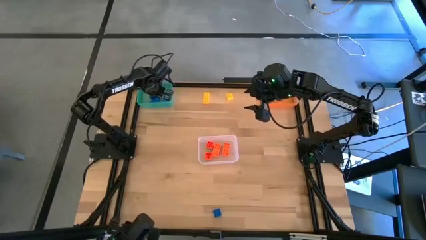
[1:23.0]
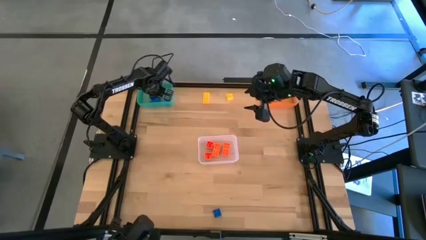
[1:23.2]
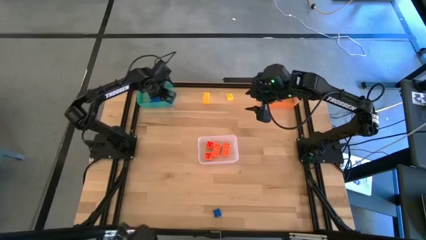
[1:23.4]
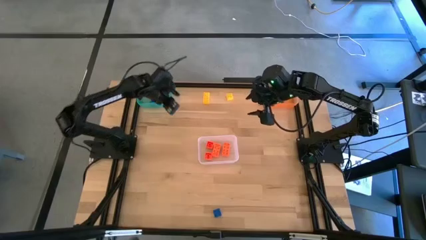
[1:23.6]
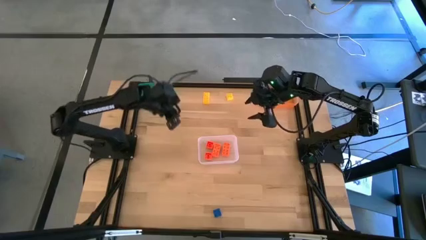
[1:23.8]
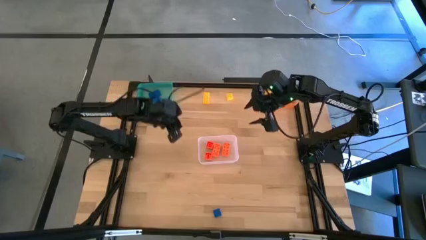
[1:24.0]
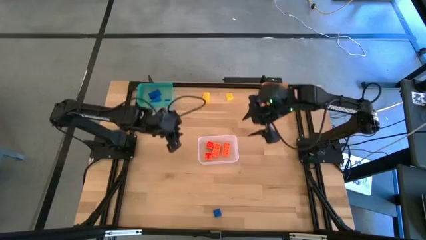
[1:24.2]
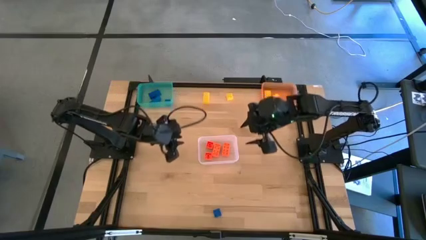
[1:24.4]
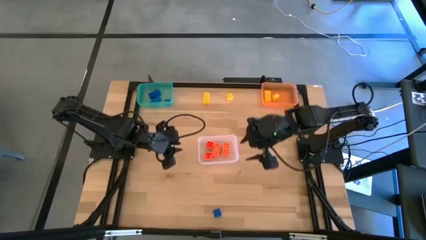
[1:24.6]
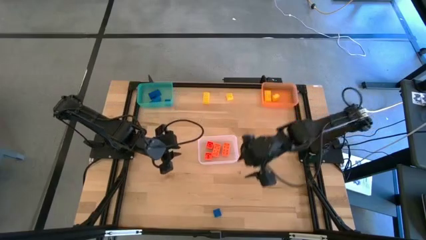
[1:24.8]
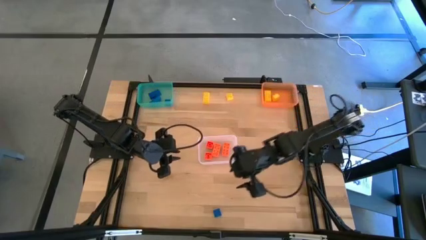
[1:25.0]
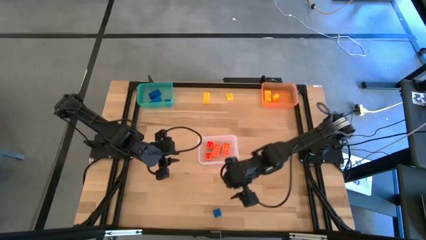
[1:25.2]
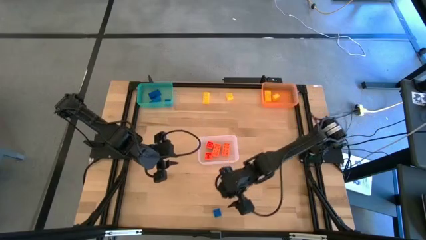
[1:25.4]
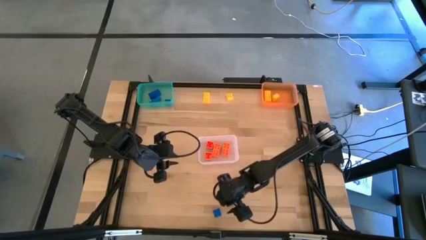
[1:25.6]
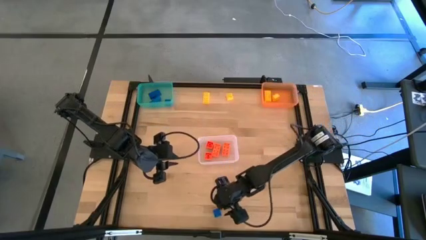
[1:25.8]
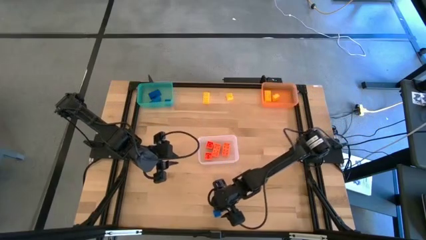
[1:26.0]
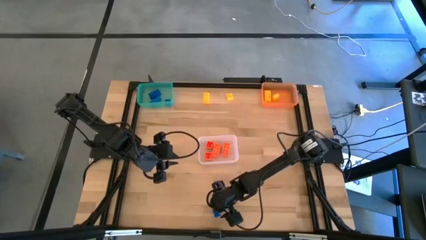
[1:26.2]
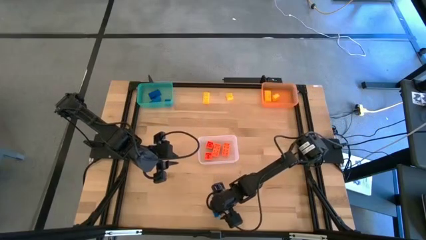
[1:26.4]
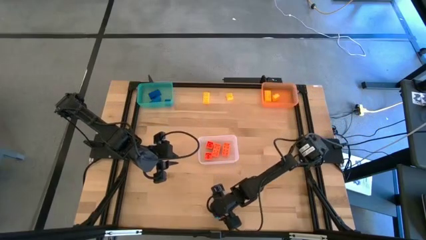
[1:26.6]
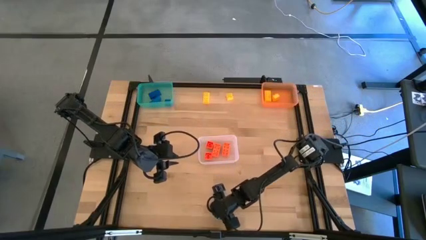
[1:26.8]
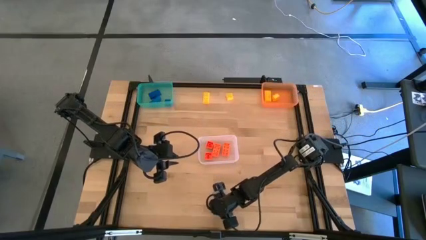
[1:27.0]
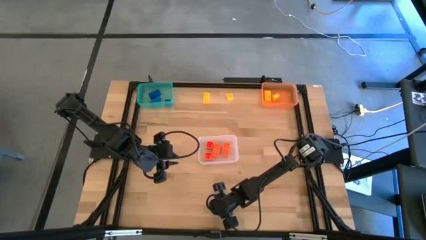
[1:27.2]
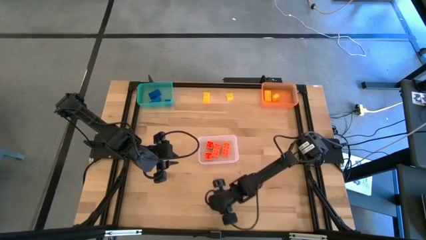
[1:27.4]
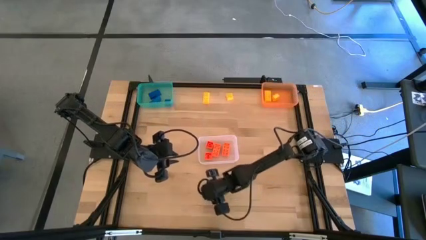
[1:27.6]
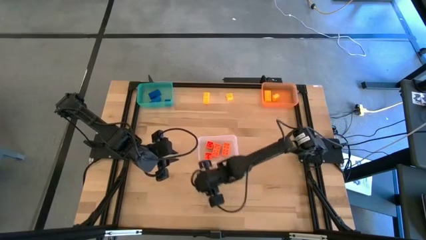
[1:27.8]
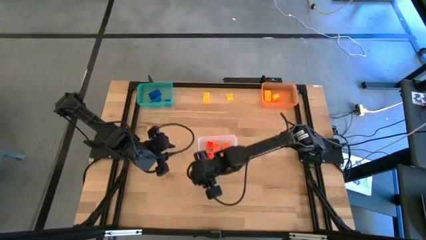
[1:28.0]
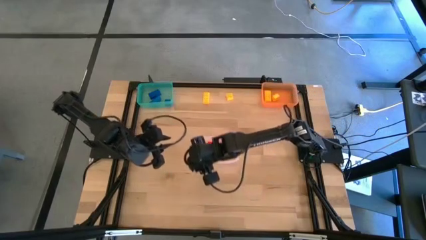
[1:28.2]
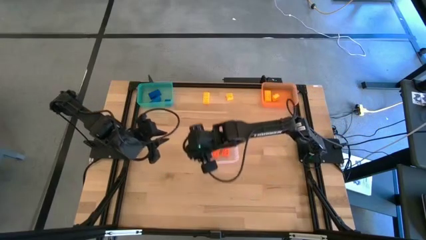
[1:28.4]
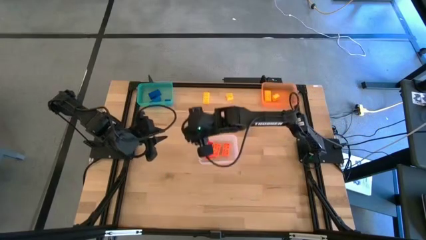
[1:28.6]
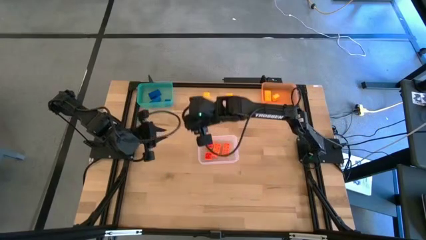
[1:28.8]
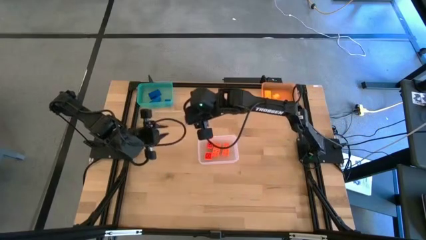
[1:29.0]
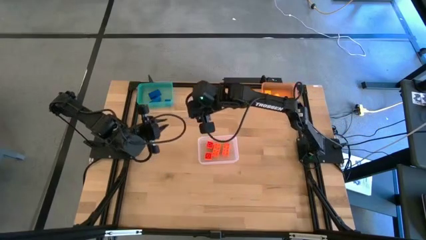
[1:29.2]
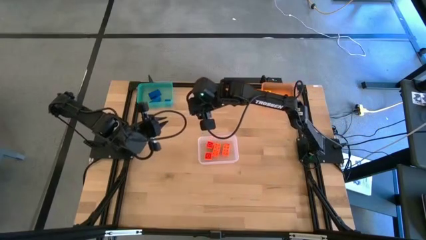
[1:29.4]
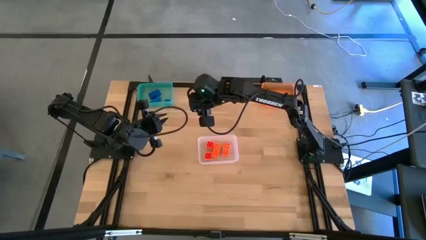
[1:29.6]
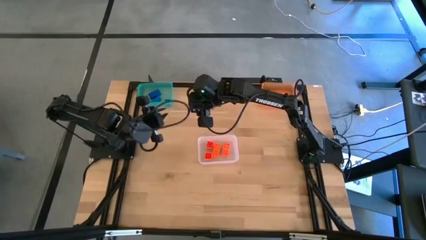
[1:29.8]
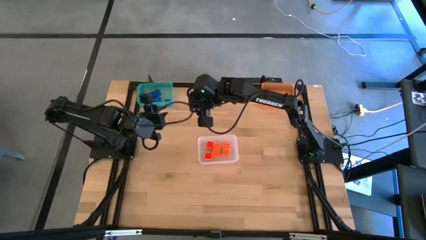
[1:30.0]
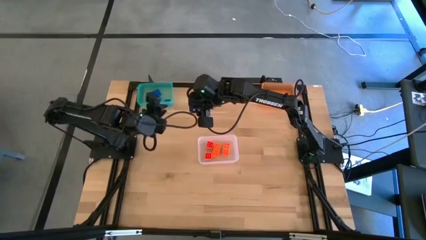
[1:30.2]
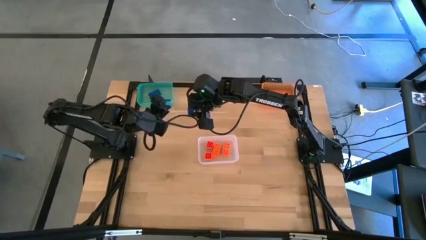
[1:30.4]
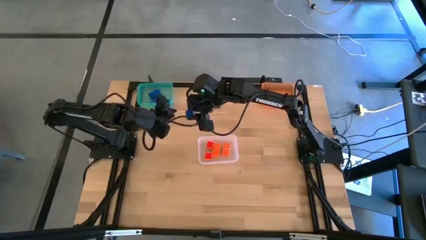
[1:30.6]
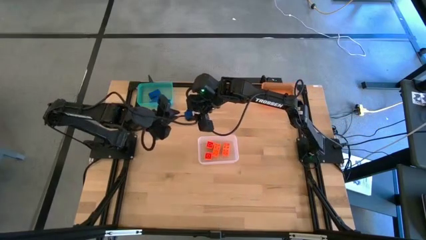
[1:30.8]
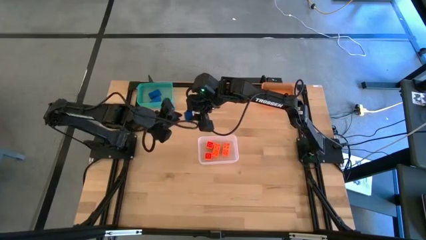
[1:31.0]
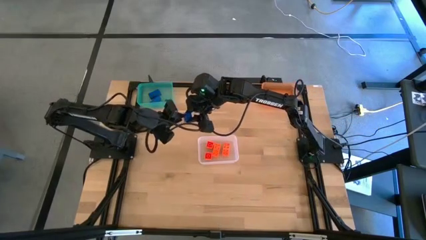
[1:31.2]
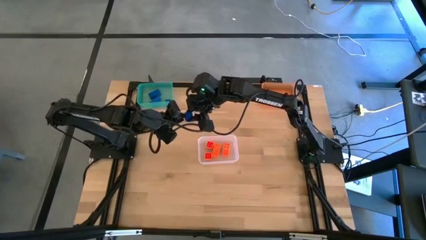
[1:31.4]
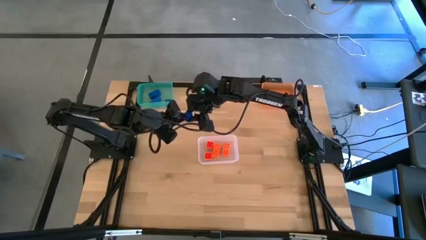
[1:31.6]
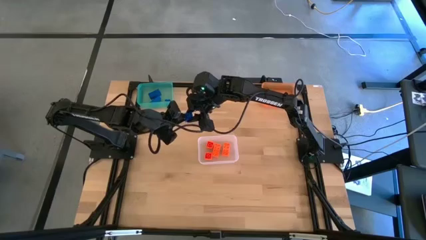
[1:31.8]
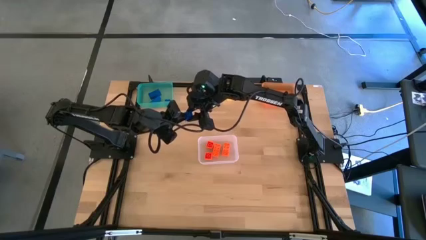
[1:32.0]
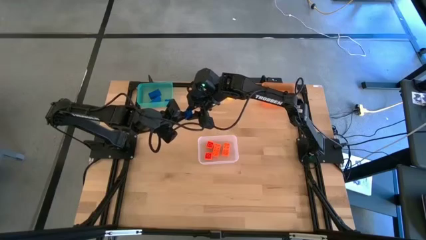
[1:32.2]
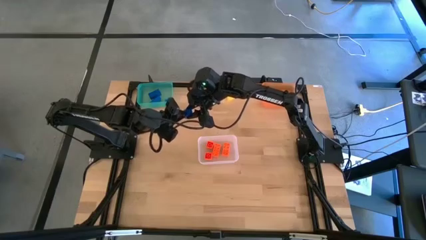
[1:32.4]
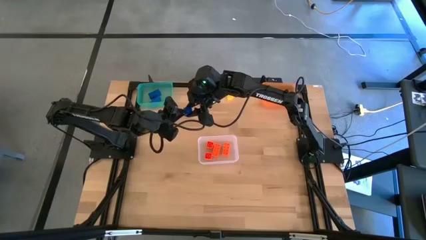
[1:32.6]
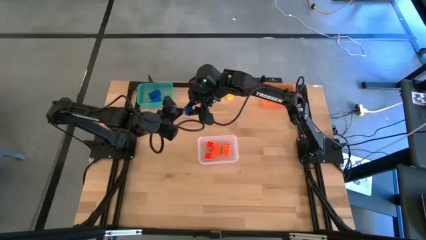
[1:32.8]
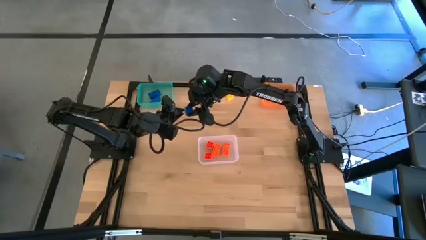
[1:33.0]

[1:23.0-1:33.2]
Task: Sort & place blocks by color
Put the blue game piece into the blue bin

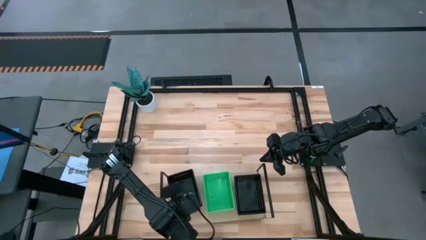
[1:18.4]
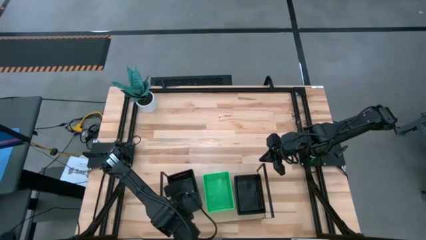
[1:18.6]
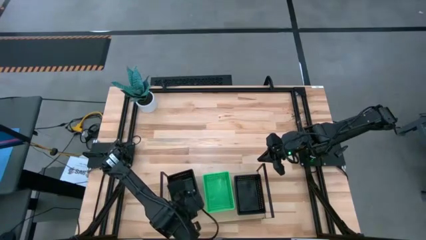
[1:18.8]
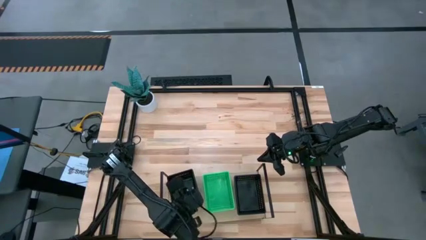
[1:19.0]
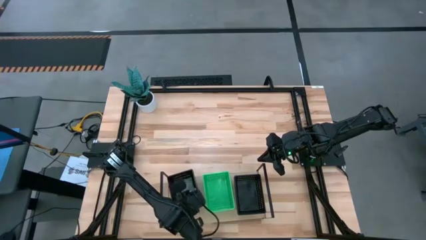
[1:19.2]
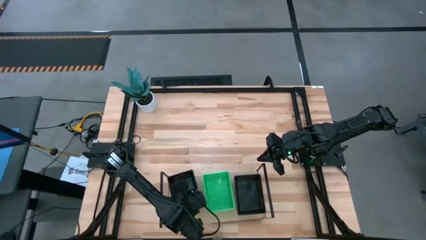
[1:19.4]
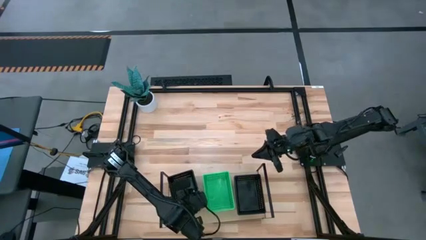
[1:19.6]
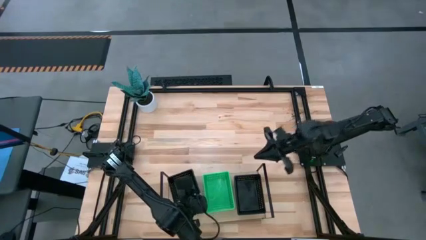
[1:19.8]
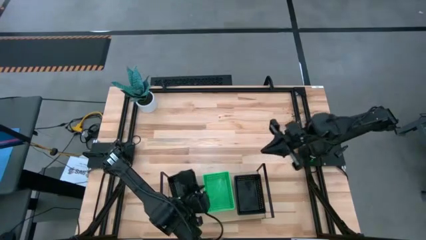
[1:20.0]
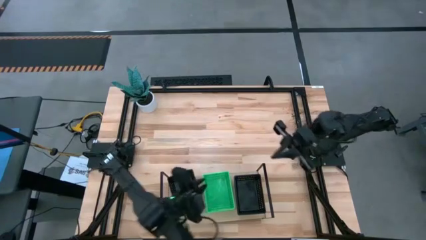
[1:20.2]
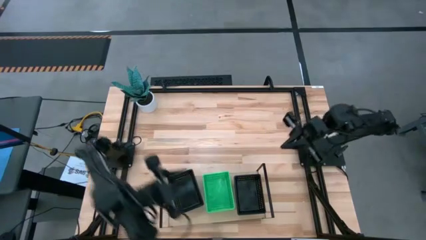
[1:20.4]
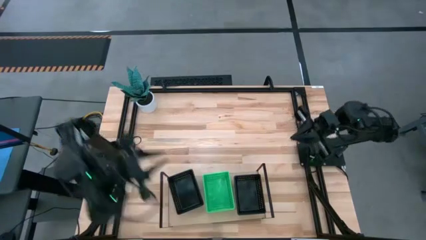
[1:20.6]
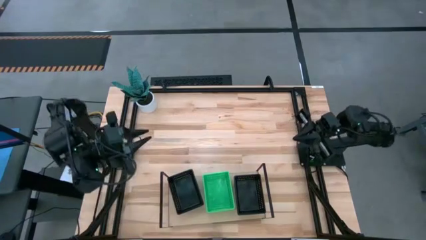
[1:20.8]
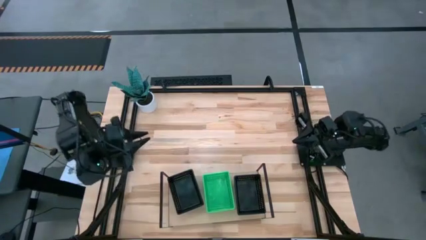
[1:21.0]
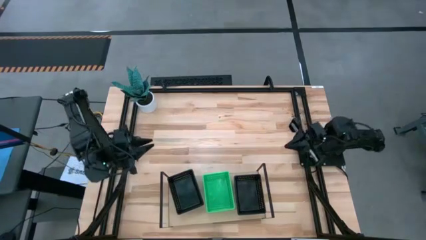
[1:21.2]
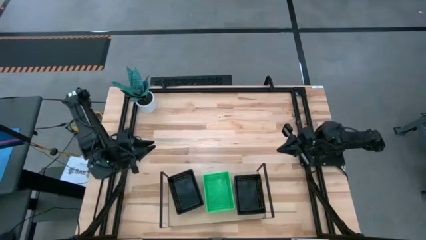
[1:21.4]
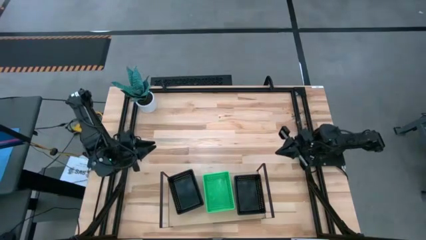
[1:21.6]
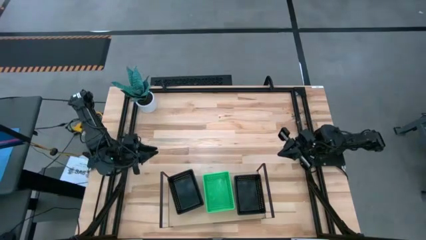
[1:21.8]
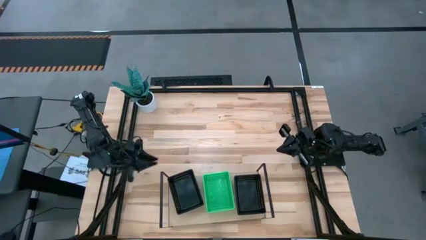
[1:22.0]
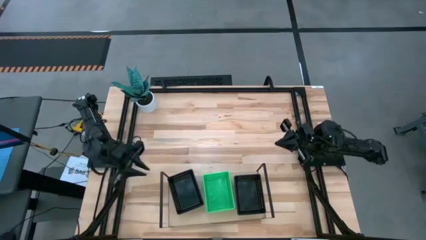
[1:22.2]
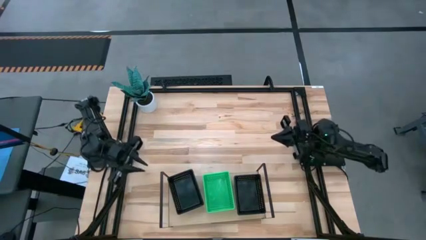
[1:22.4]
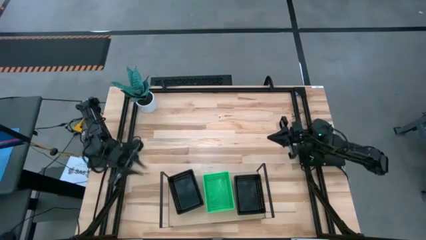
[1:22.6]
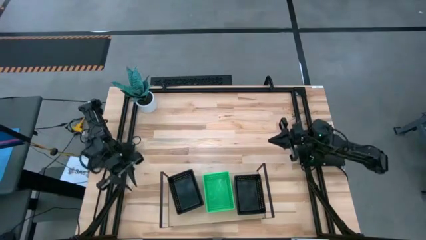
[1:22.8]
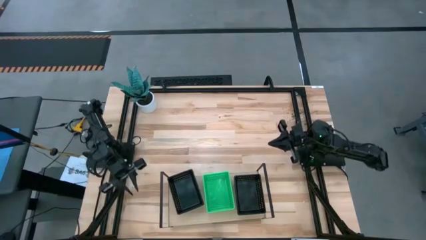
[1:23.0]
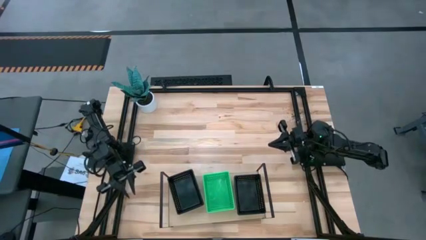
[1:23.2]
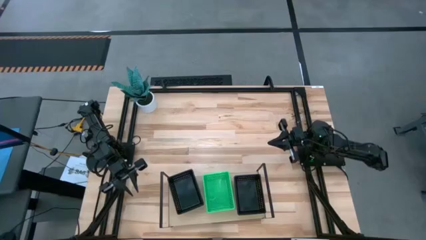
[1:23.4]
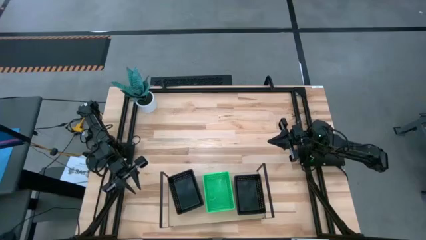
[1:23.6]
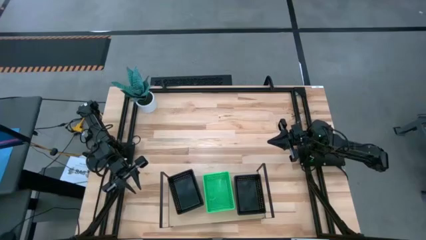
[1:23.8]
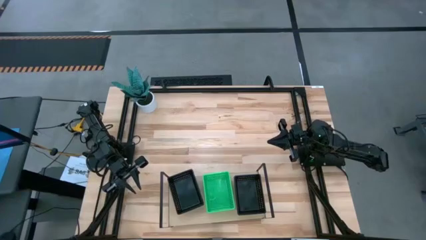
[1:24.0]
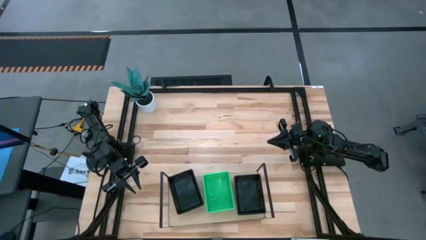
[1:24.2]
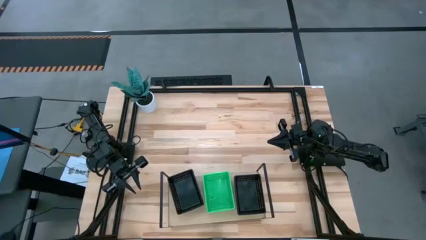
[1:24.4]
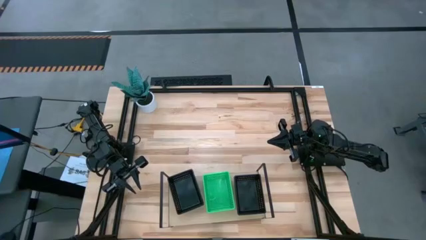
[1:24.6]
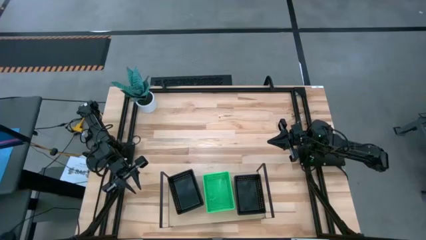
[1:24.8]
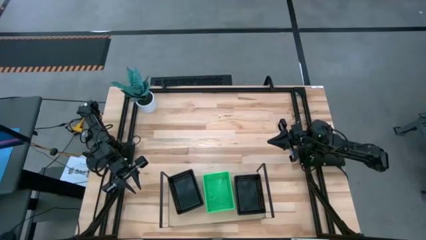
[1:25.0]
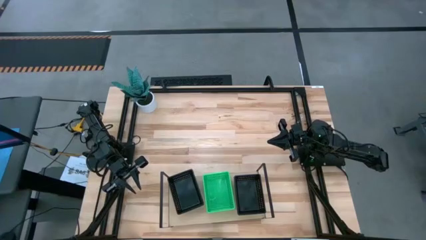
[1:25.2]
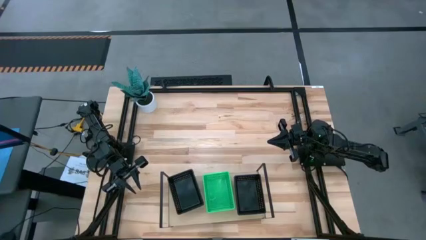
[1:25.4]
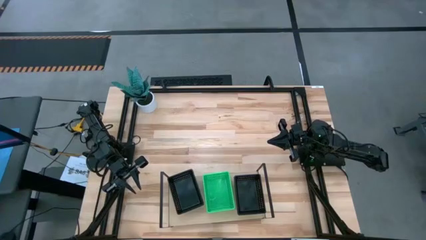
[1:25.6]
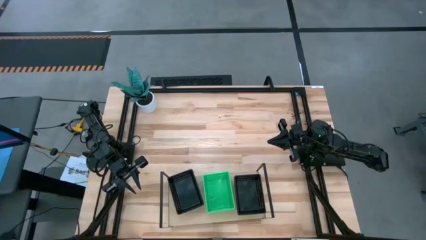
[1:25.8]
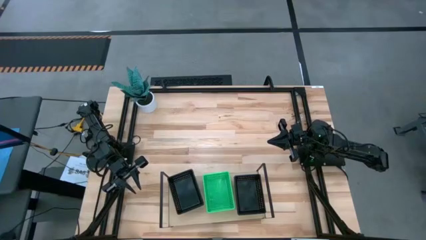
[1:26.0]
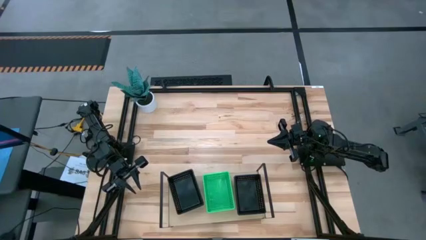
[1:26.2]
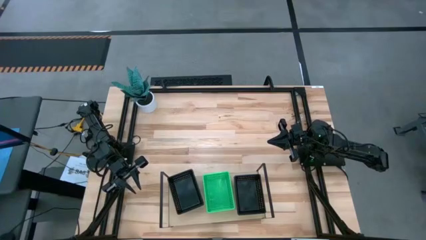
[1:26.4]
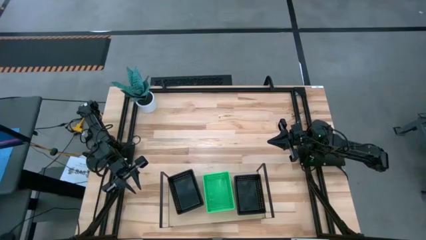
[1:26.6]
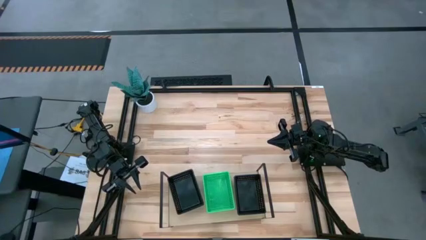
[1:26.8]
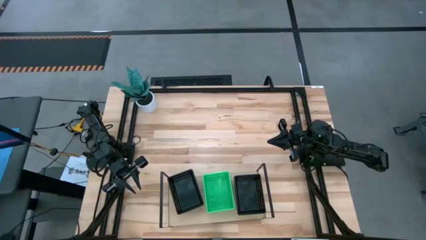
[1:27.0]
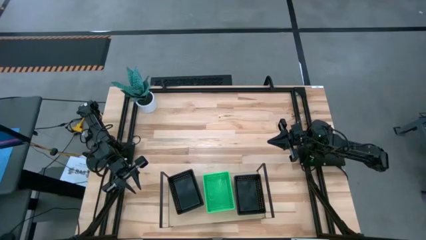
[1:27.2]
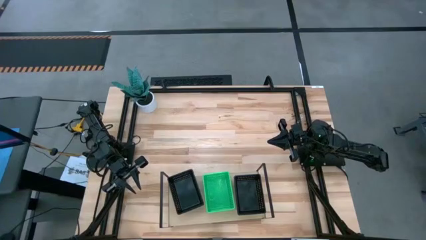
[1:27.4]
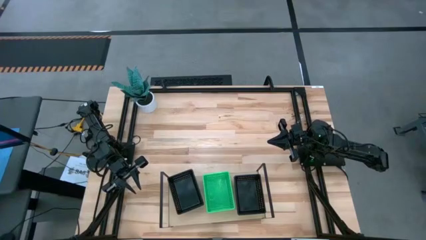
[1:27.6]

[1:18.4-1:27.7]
Task: Stack baskets on shelf by color
Return to Home Position
